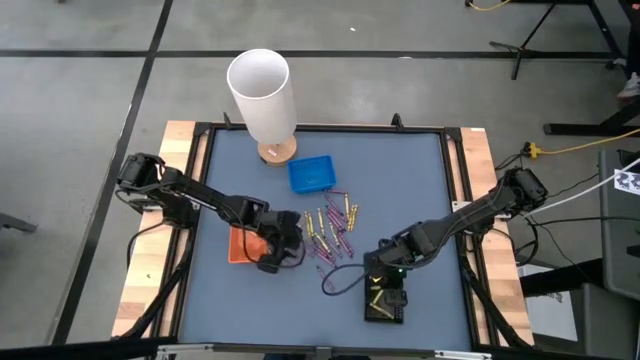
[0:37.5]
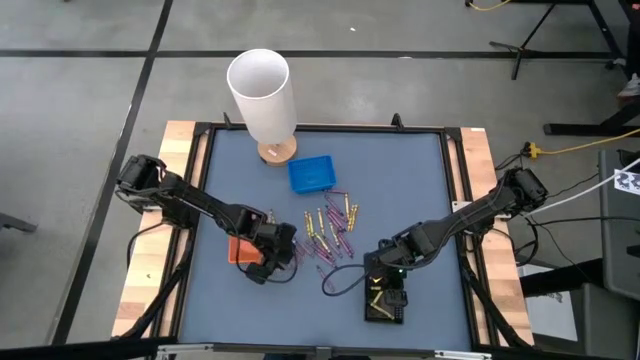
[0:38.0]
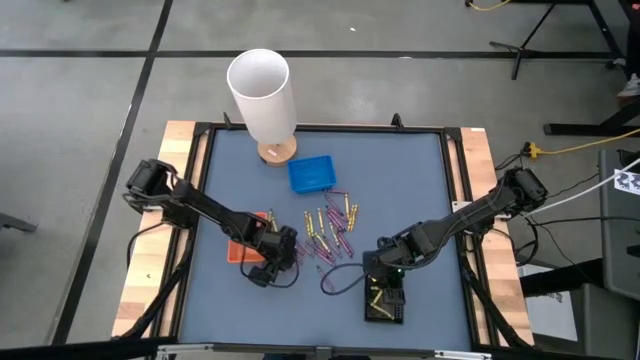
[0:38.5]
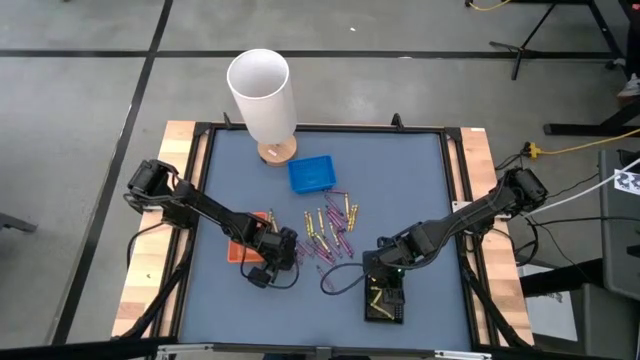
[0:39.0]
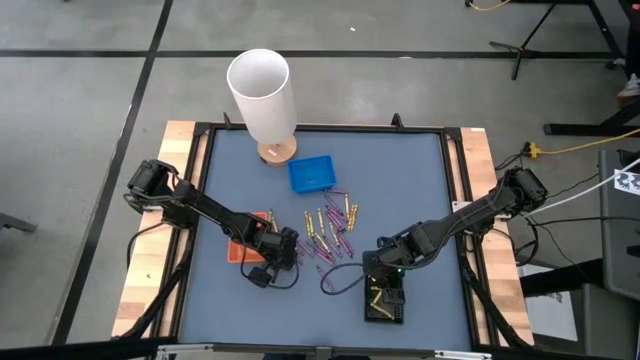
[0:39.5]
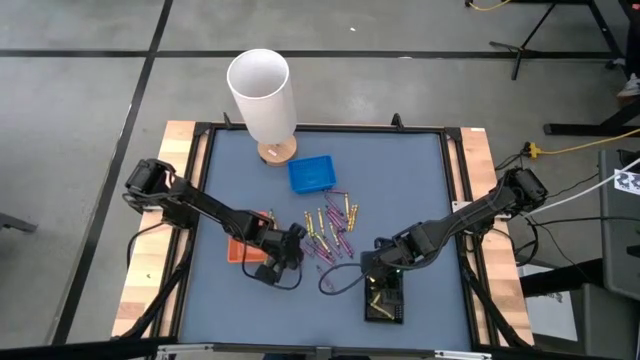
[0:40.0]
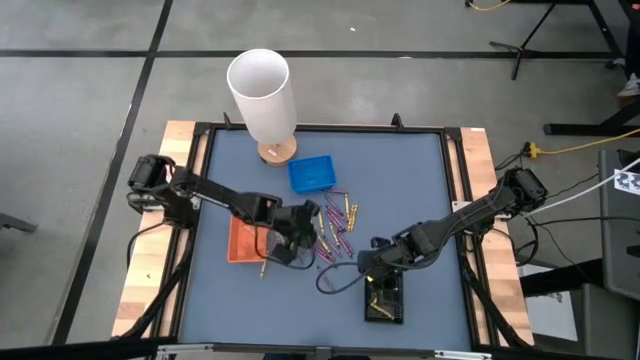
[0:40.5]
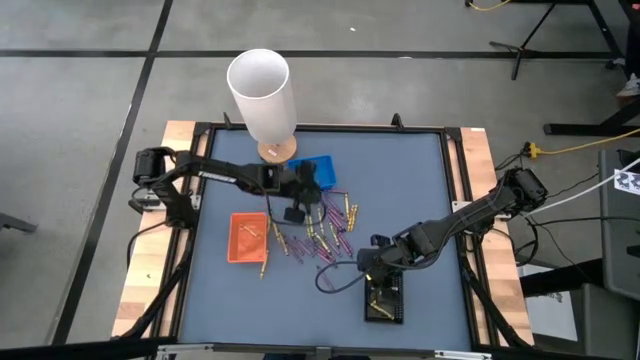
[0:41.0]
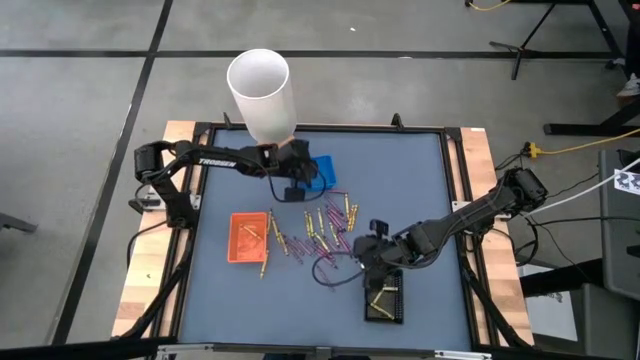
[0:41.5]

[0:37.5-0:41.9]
Task: Sort crayons
Put the violet crayon into the blue bin

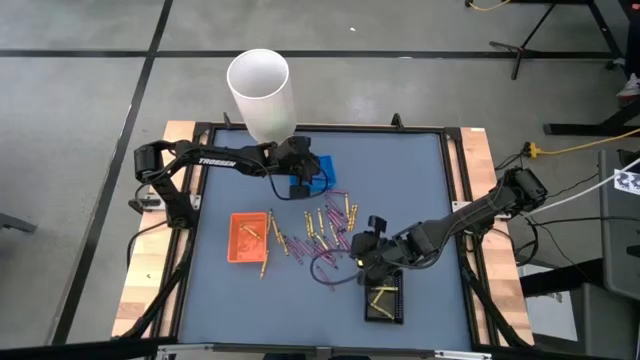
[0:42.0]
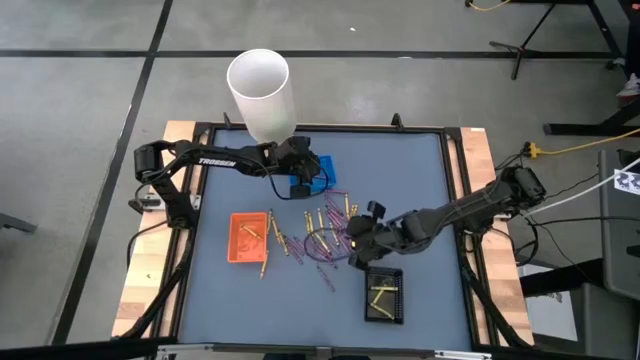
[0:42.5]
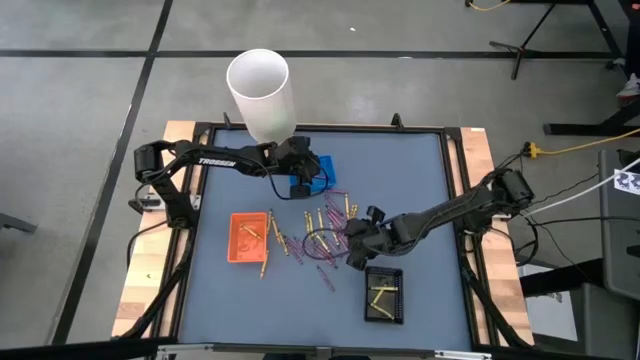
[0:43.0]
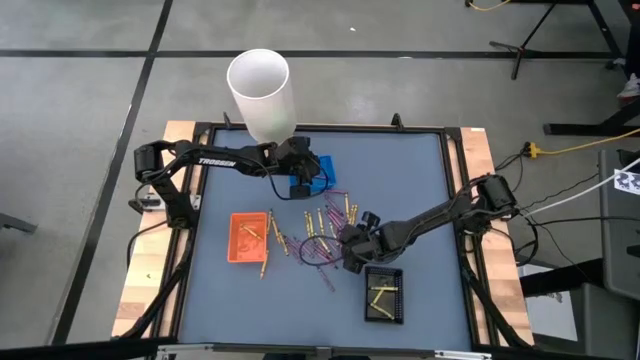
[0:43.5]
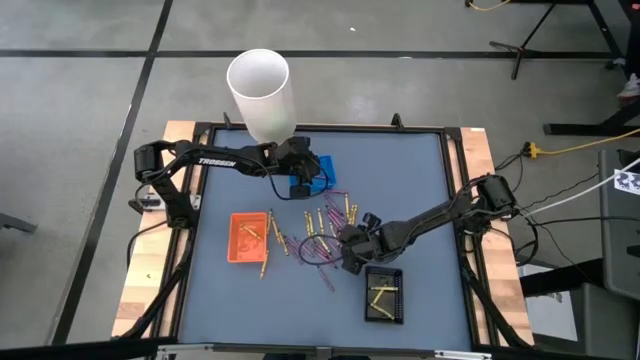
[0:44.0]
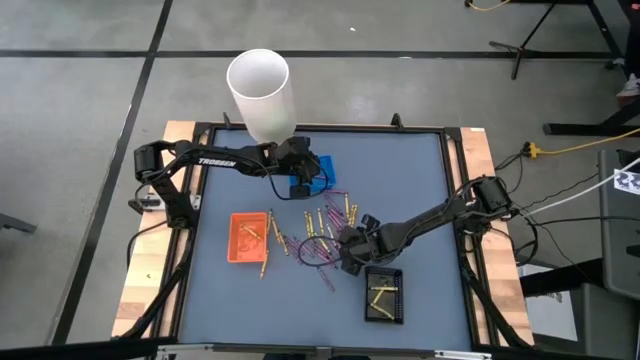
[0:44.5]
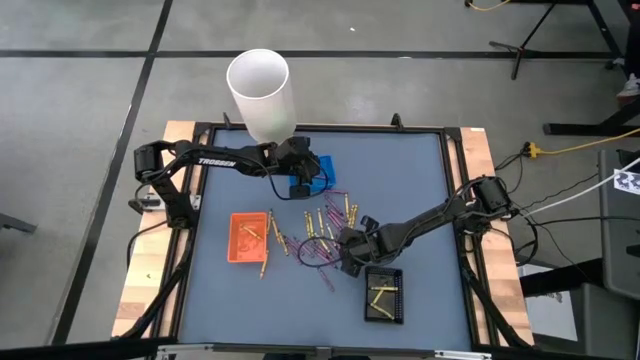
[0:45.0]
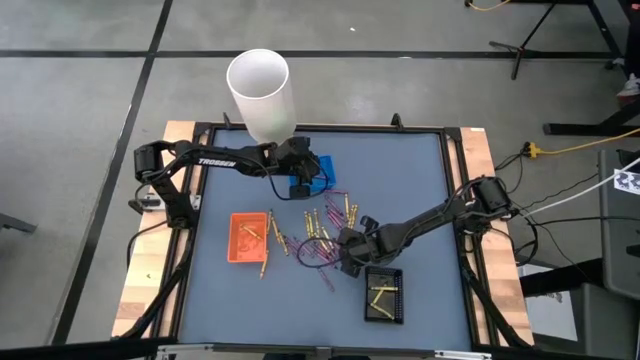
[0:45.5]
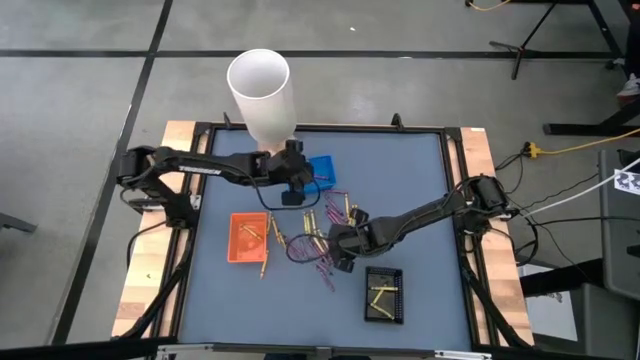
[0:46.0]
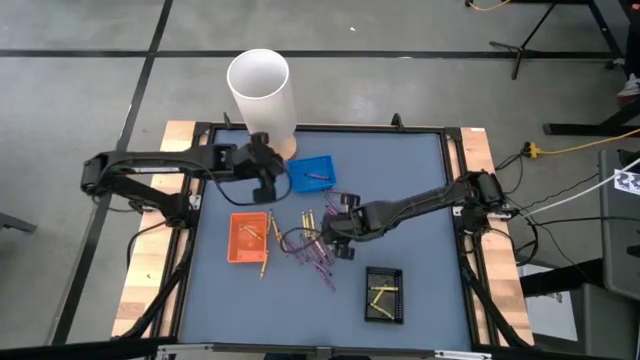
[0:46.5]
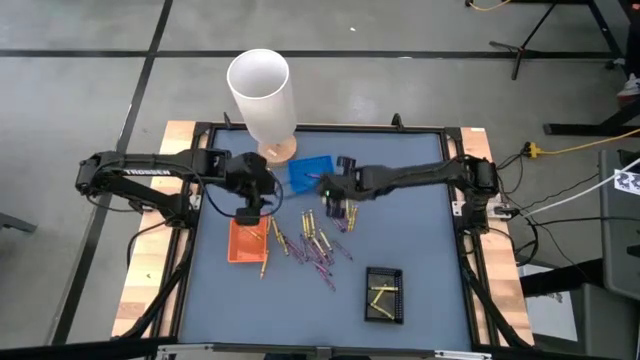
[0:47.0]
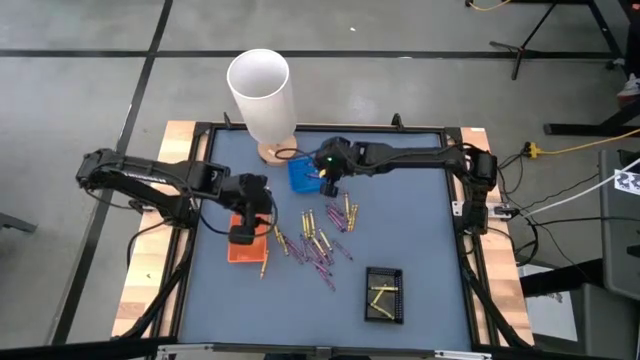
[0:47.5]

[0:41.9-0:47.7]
Put the violet crayon into the blue bin

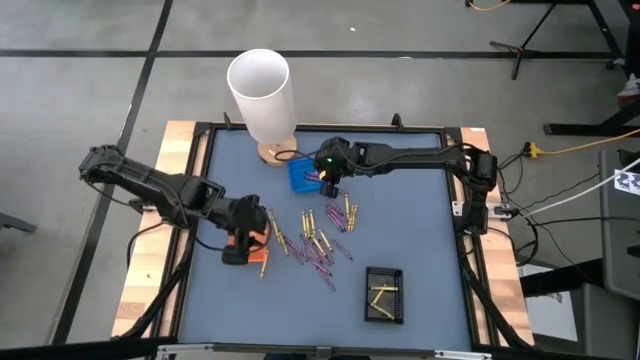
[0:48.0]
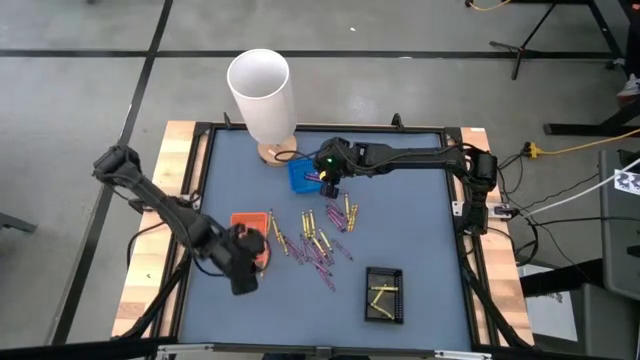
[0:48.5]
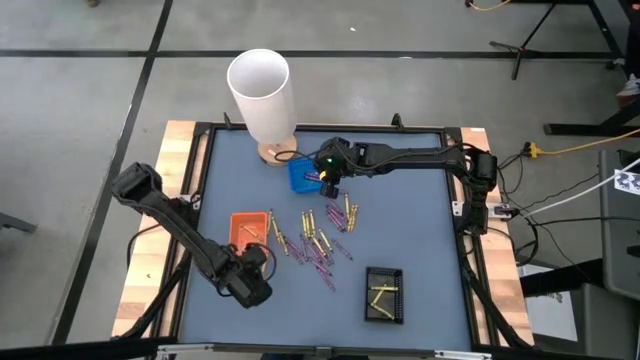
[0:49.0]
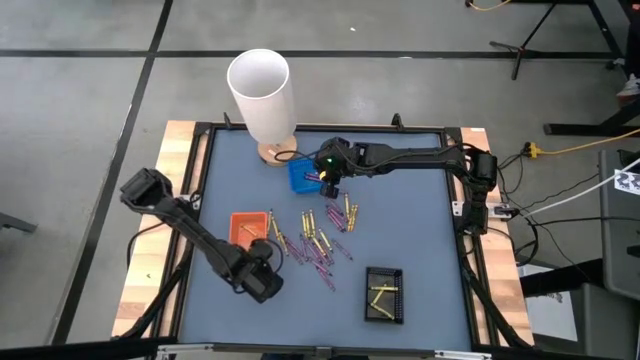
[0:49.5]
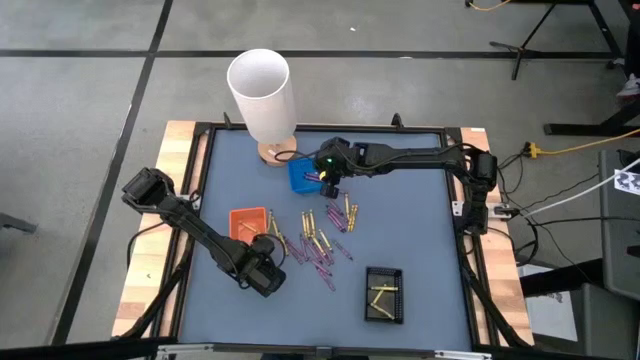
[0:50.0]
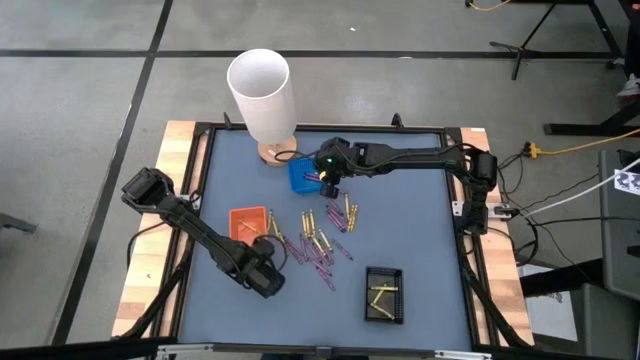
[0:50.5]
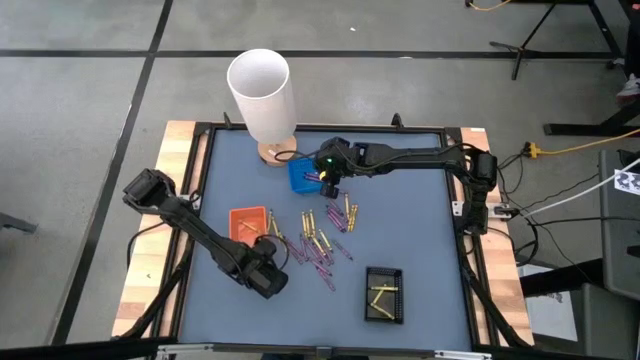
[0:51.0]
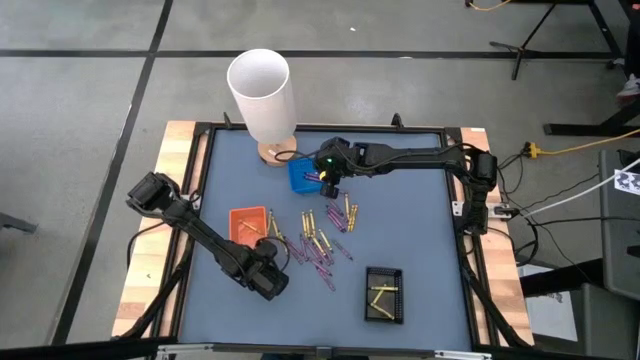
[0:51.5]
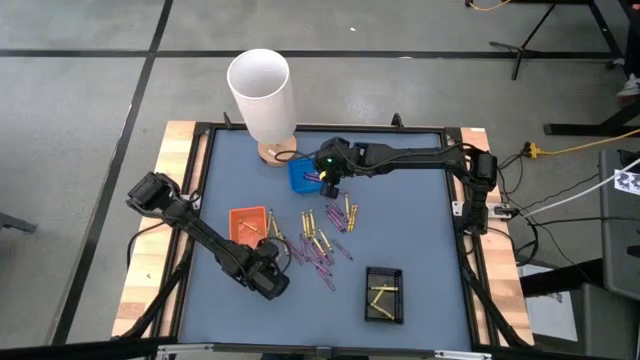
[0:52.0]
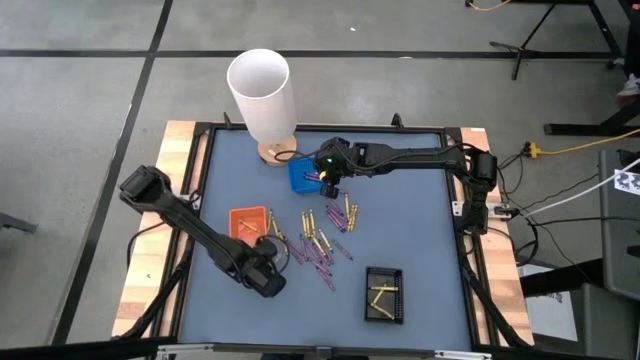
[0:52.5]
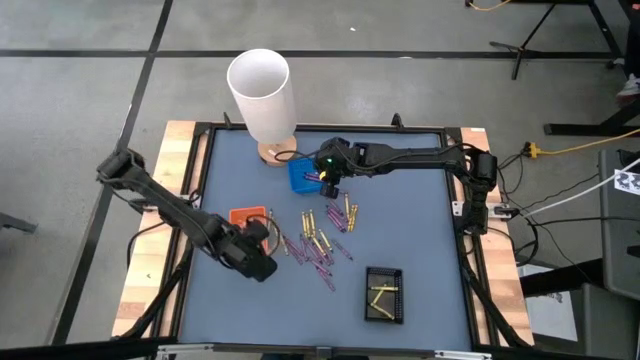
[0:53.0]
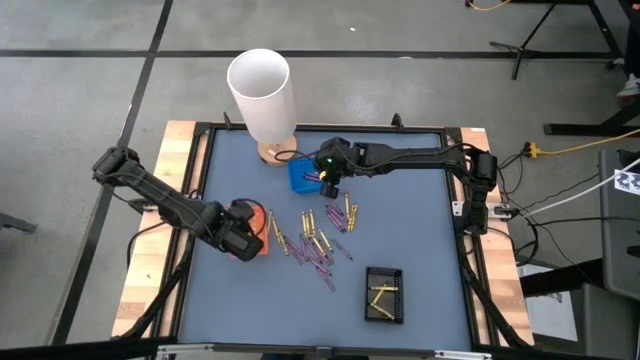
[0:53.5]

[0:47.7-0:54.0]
Put the yellow crayon into the orange bin

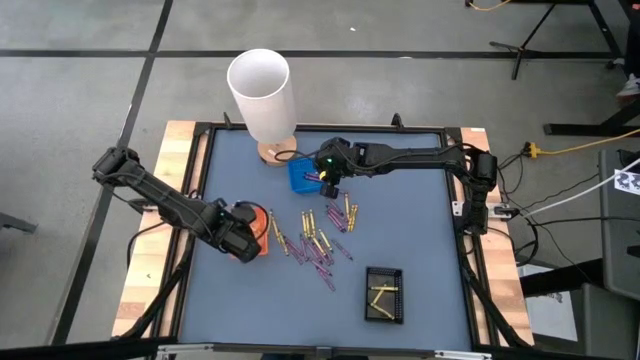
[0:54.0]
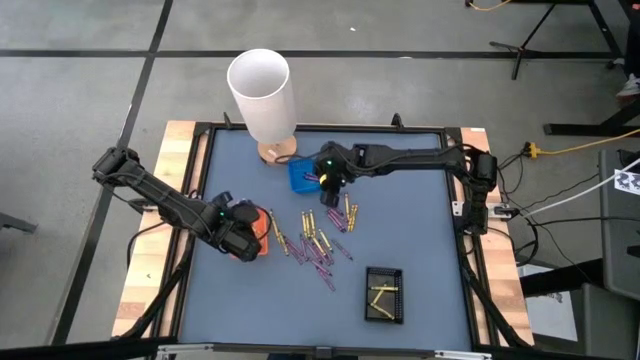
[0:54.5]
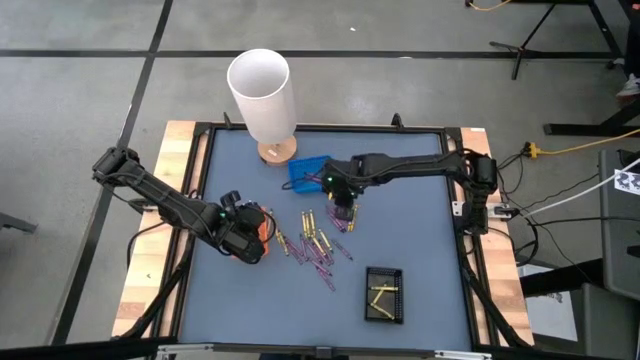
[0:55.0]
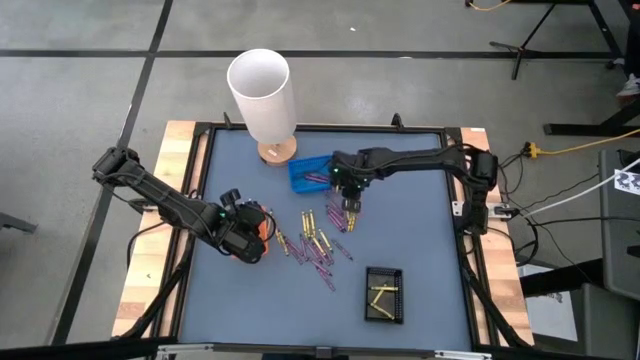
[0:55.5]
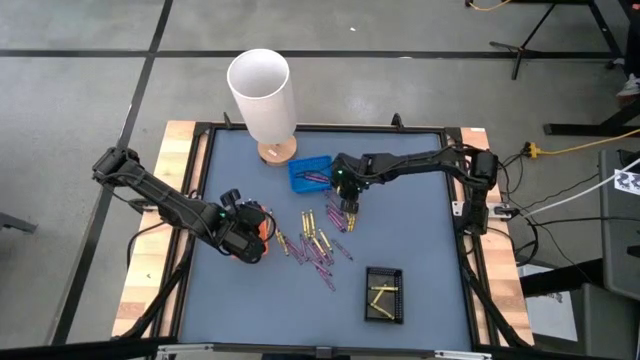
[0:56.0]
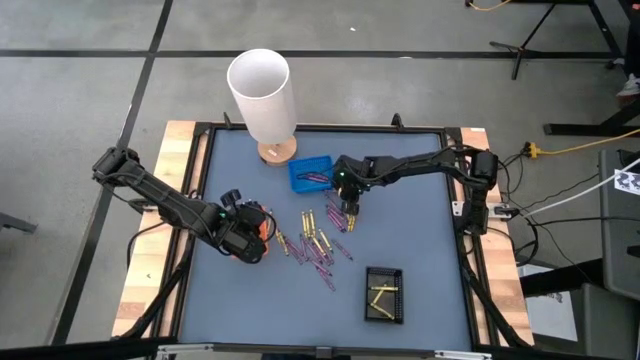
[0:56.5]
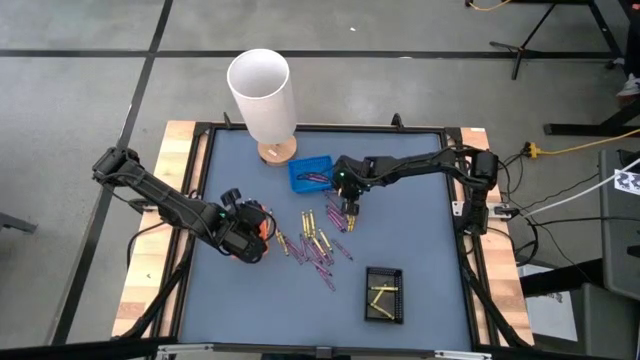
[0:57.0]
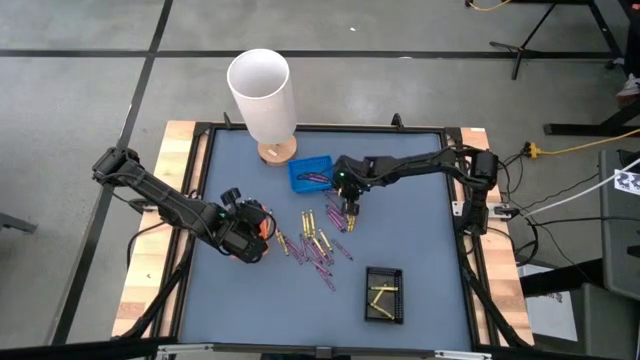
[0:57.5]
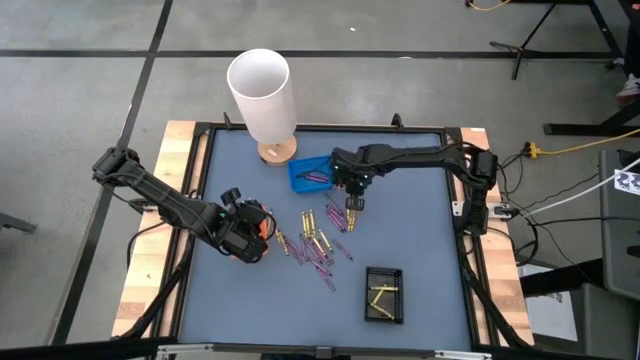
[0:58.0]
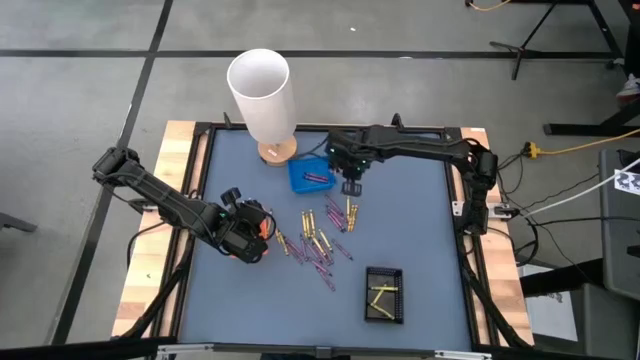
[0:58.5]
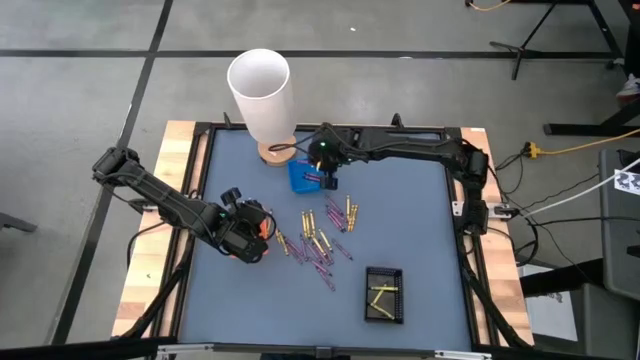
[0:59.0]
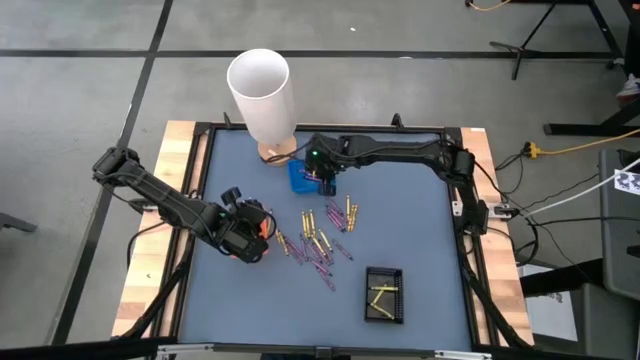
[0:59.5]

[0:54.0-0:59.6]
Put the violet crayon into the blue bin
